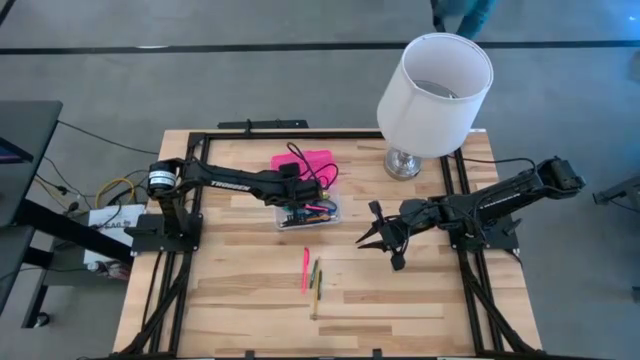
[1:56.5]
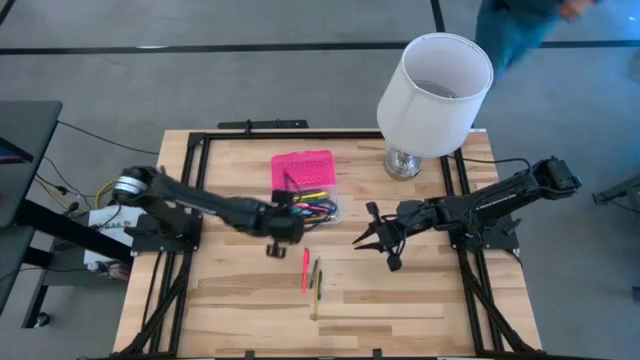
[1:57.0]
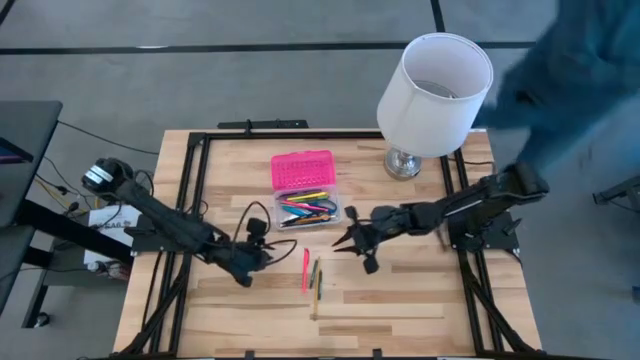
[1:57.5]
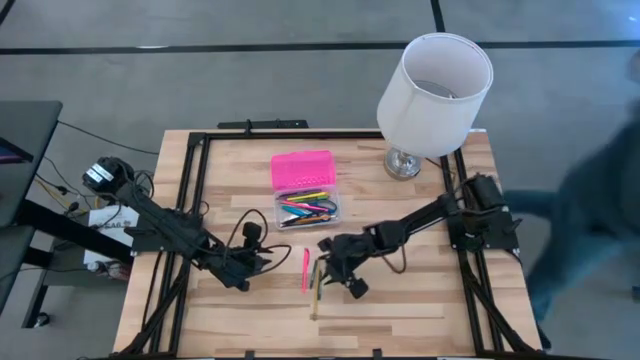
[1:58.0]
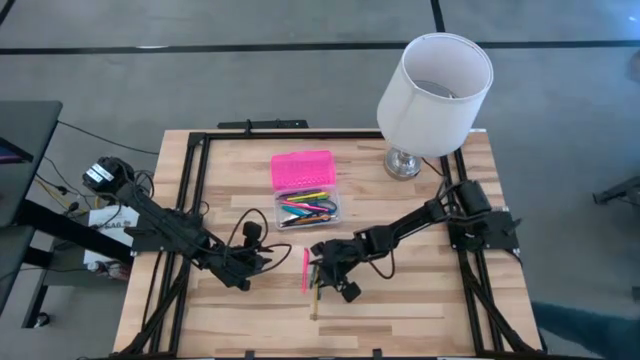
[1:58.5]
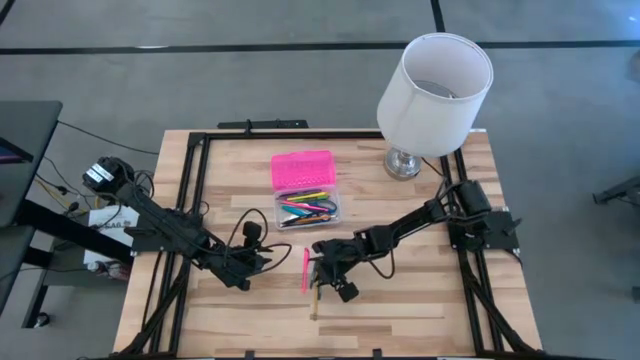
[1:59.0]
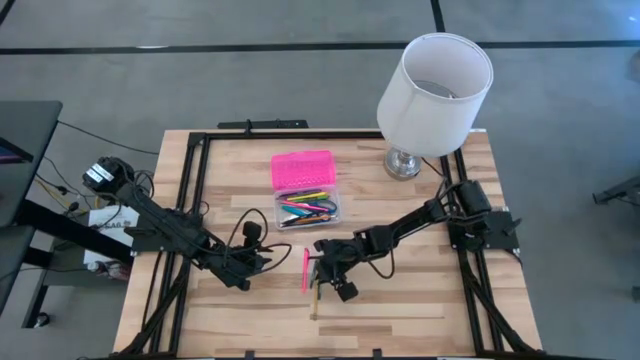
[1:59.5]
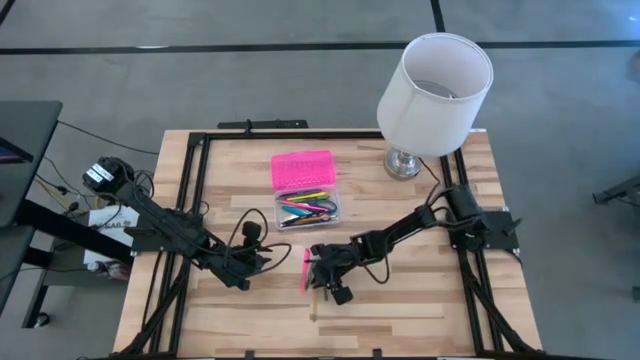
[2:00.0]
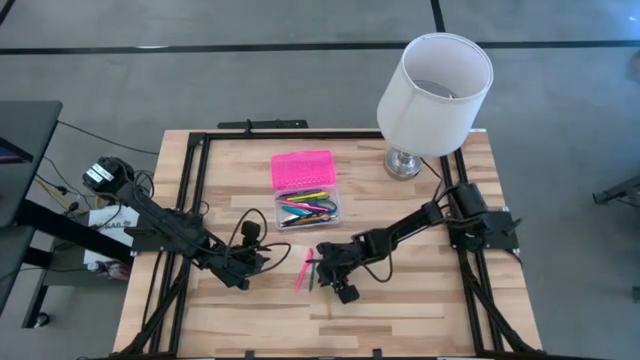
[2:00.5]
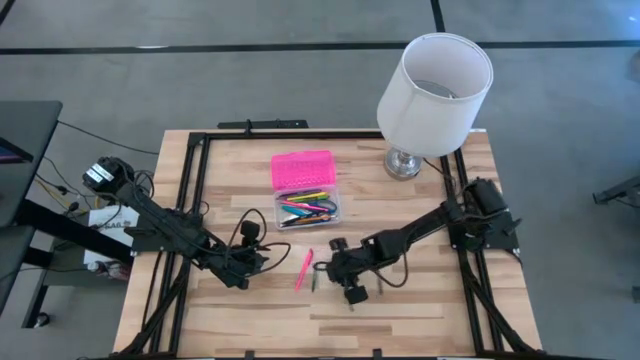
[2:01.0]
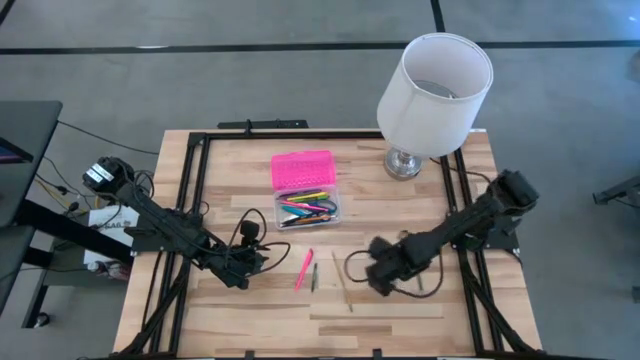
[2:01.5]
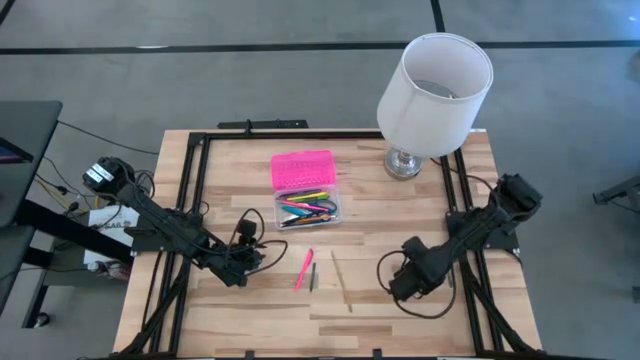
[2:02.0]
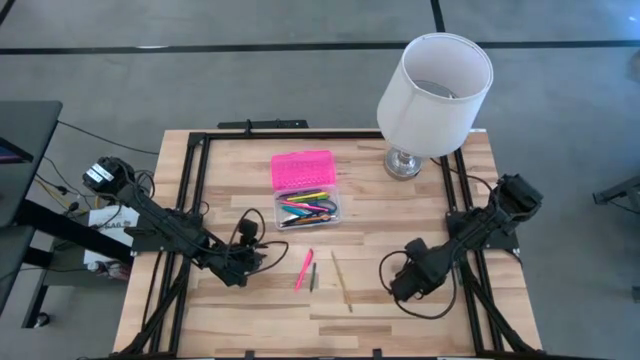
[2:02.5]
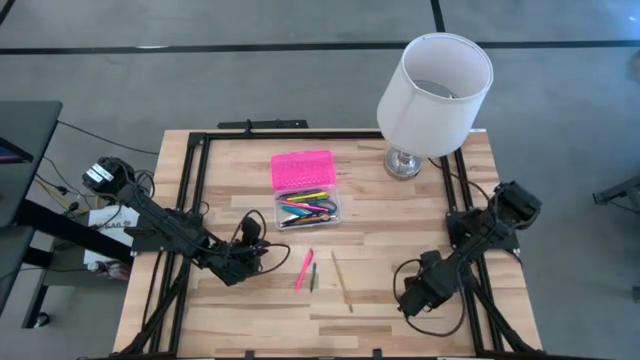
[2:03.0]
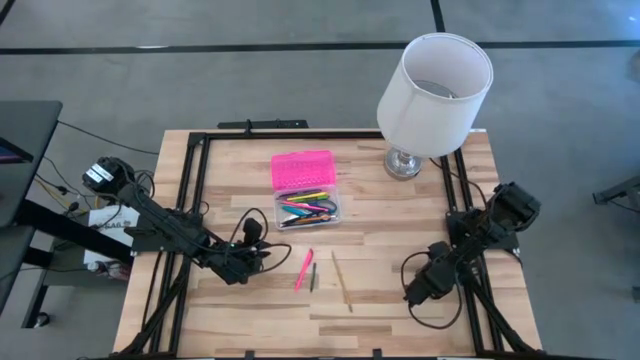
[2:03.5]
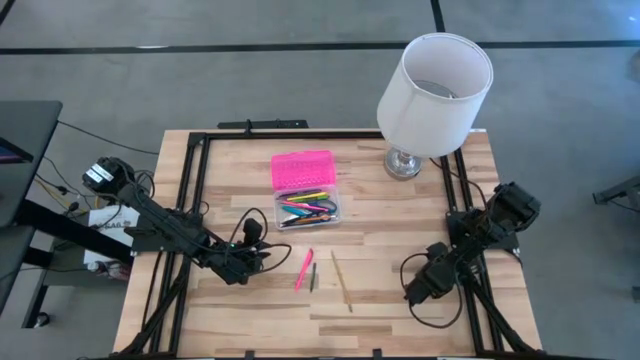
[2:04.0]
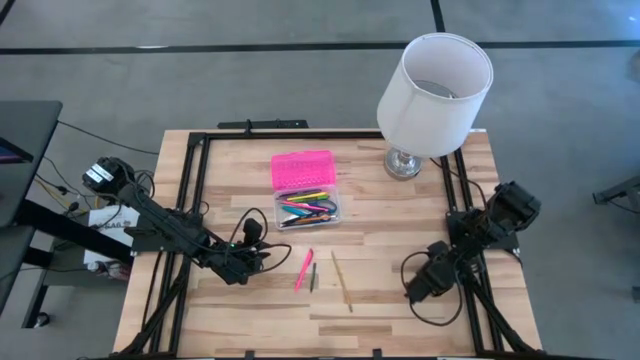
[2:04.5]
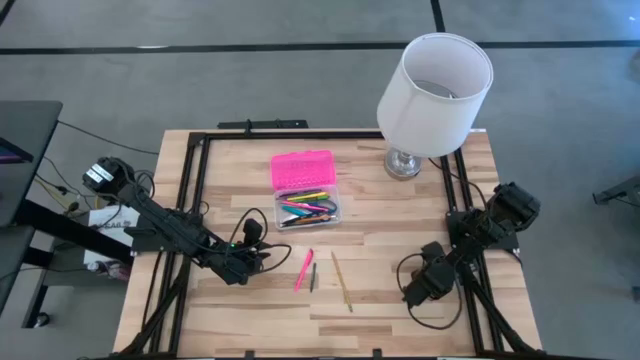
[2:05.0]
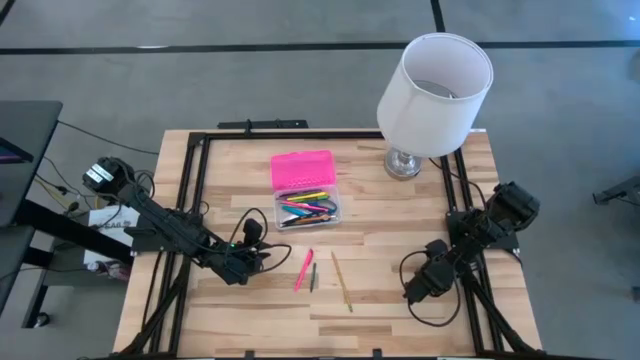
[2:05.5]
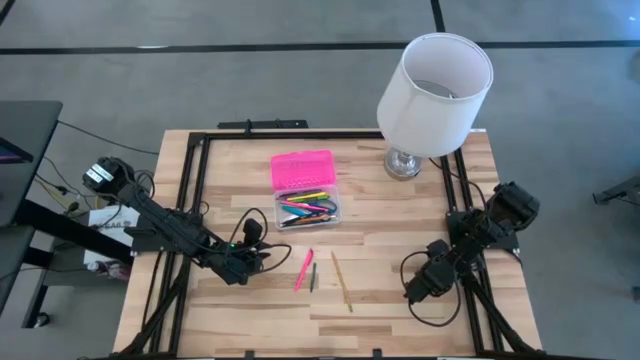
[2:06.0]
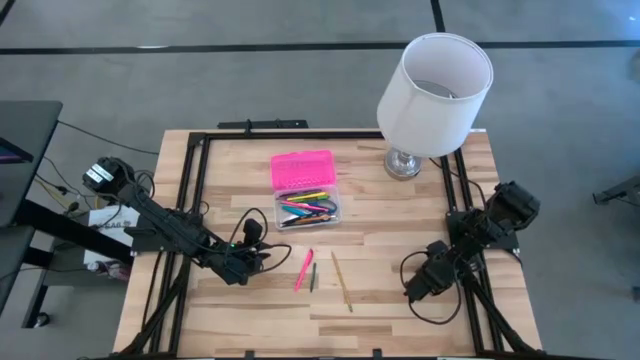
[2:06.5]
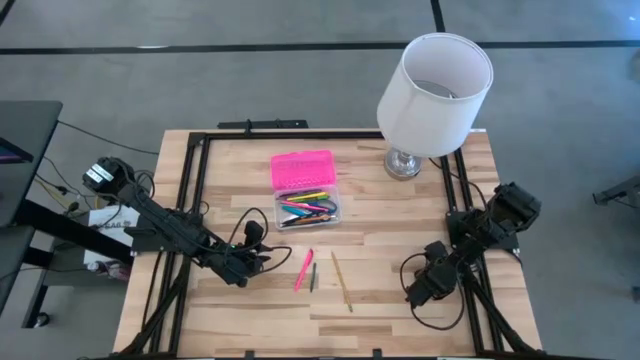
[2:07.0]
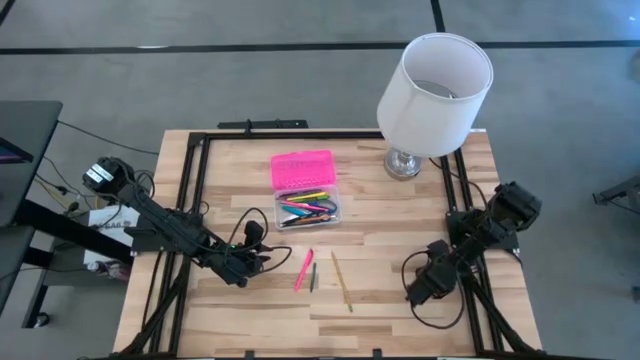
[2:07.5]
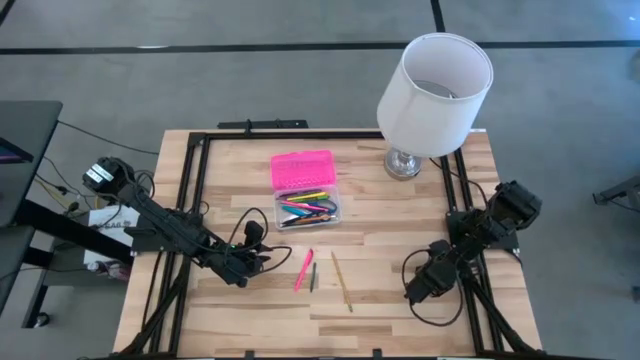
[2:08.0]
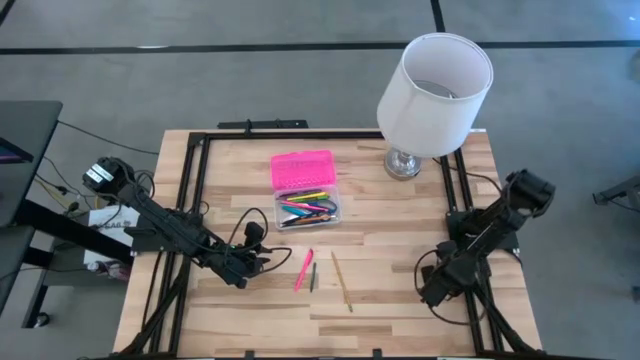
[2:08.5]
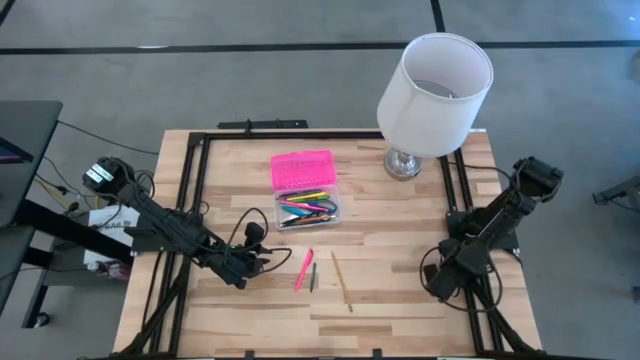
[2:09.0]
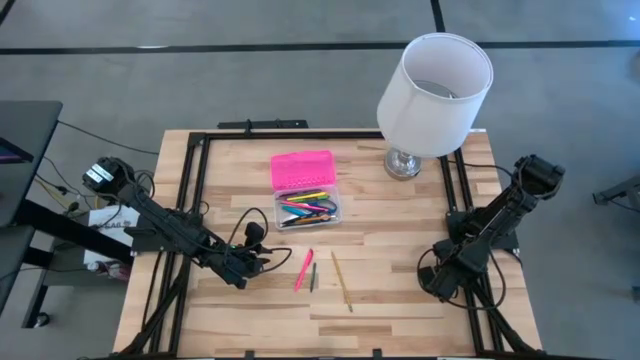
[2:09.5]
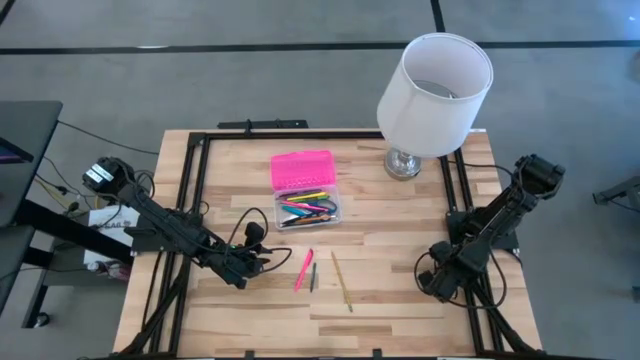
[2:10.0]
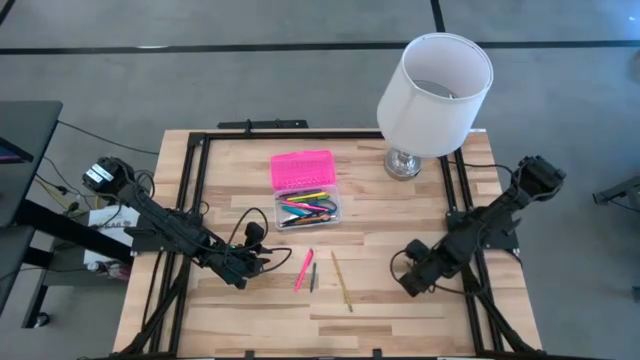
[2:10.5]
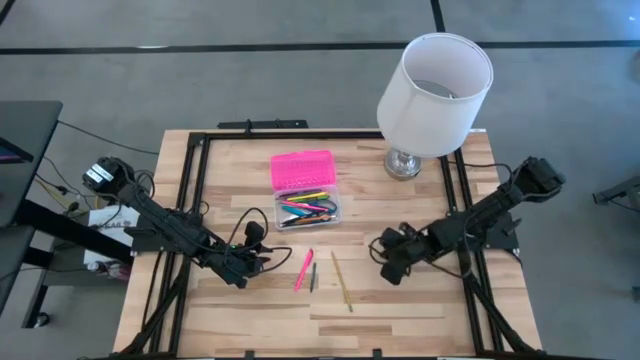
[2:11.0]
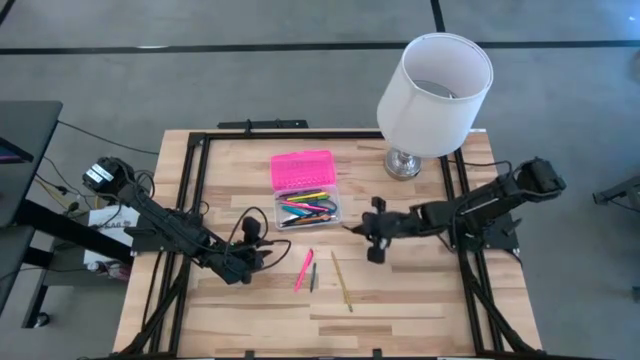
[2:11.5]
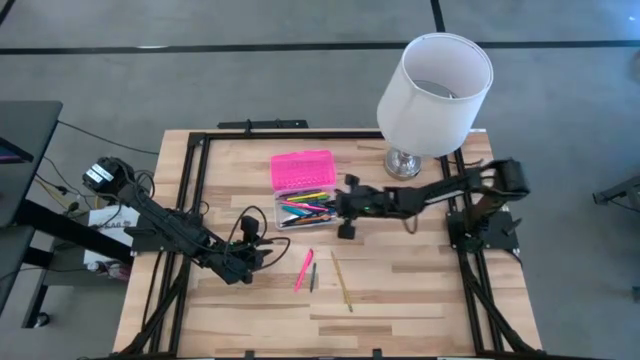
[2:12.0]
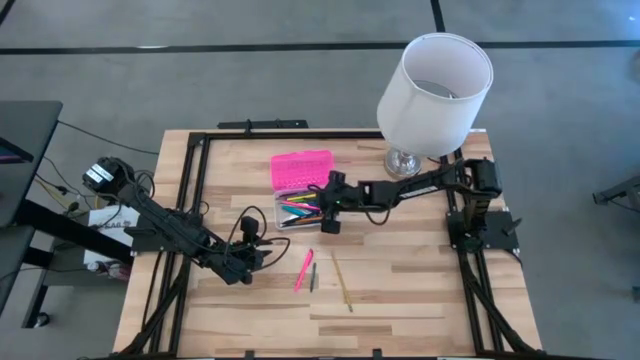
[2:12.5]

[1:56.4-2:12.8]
Task: Pick & place school supplies into a supply box
Put the right green crayon into the pink supply box

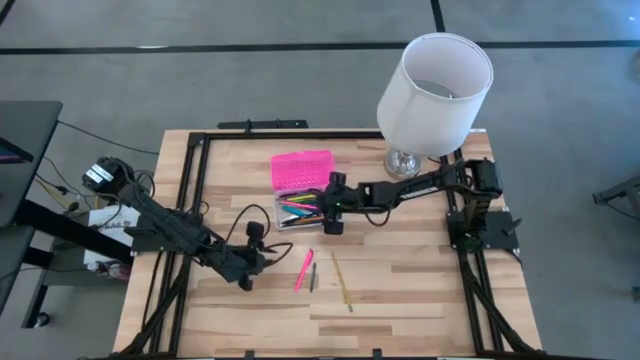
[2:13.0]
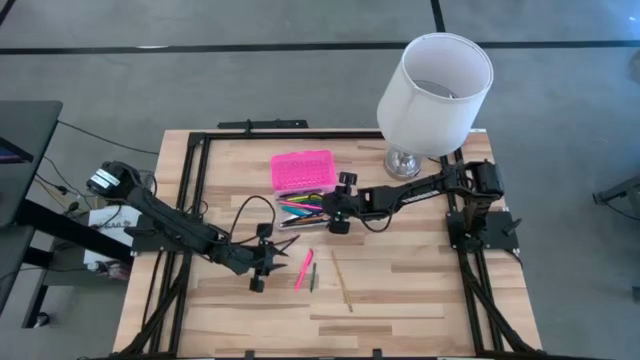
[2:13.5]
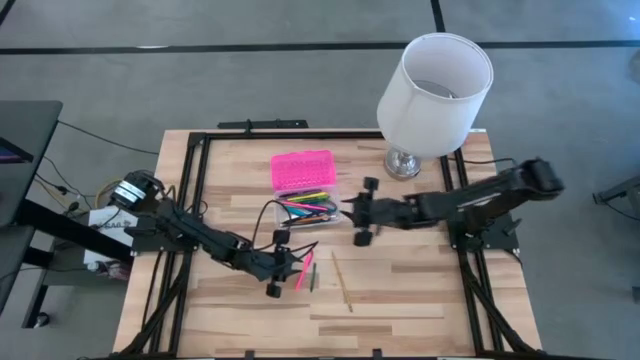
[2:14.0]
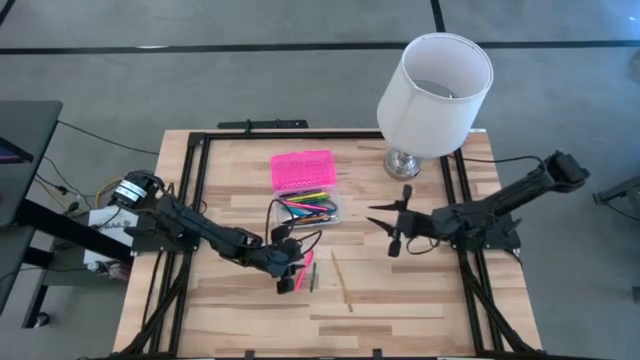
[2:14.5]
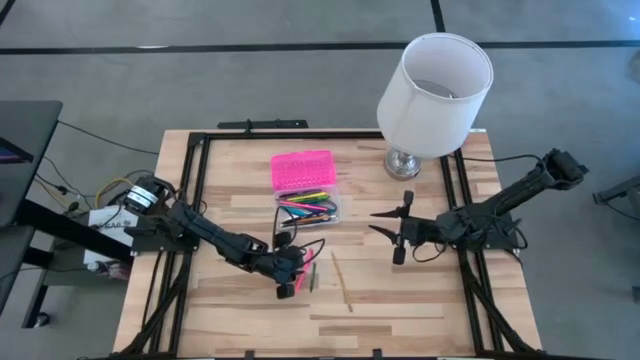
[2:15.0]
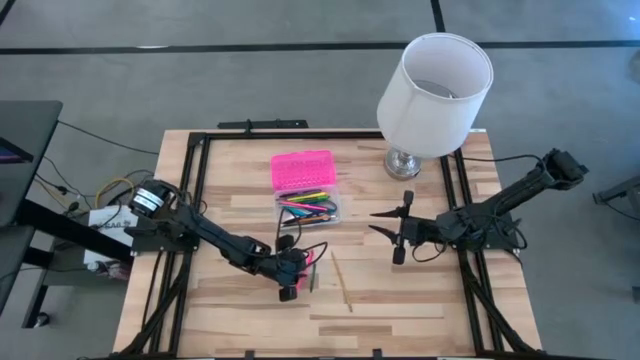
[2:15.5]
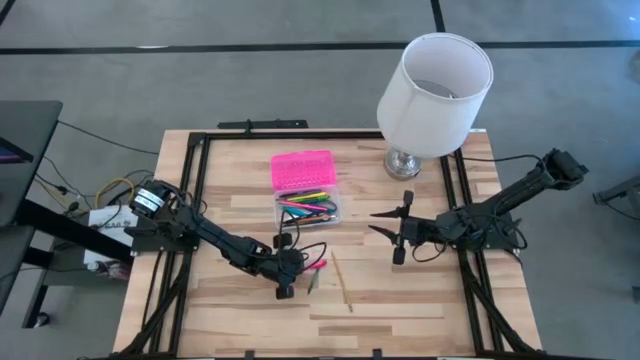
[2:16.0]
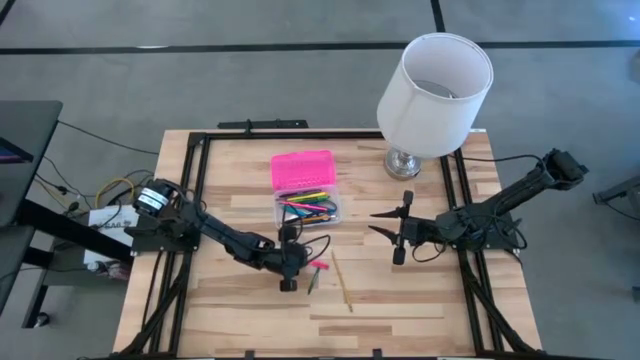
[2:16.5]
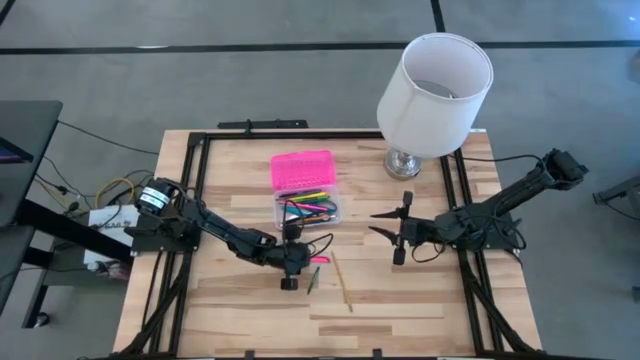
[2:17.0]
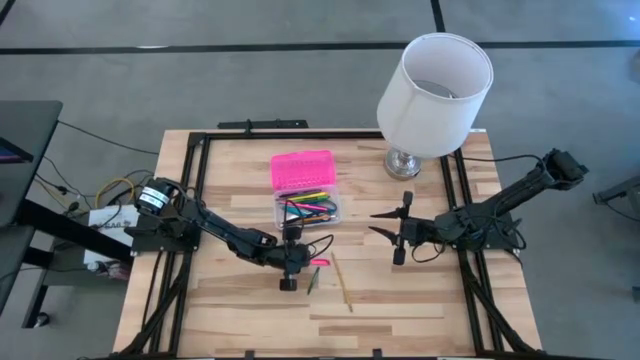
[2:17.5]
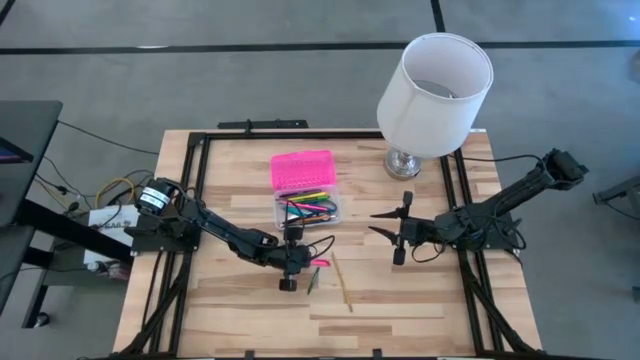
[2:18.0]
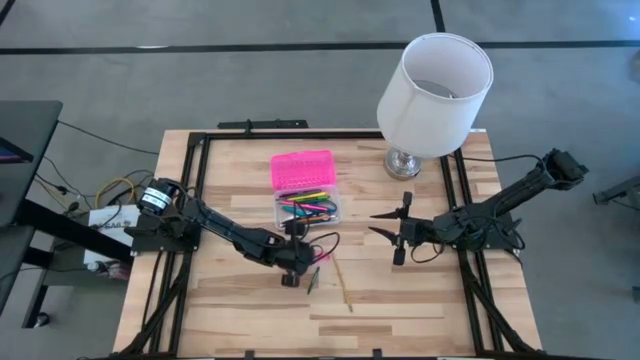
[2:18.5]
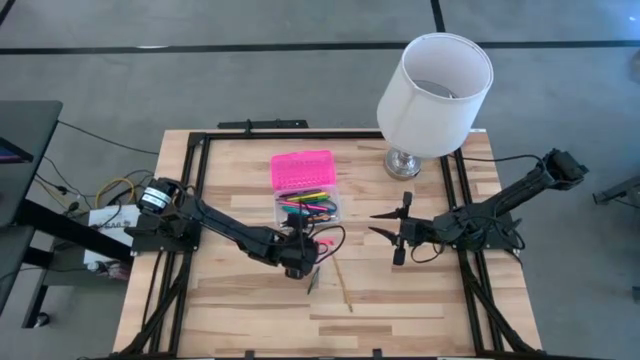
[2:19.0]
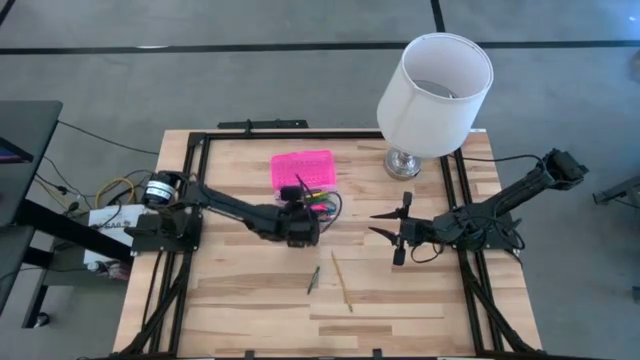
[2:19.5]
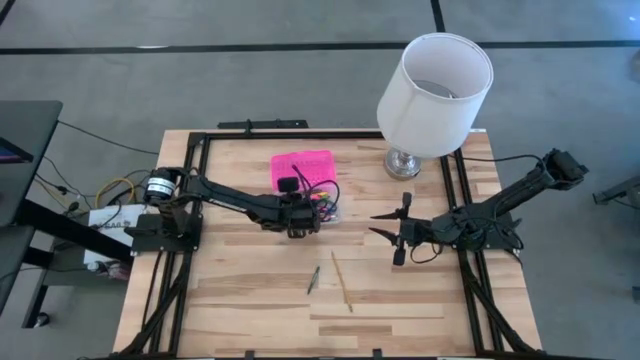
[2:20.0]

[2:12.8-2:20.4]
Put the pink pen into the pink supply box
